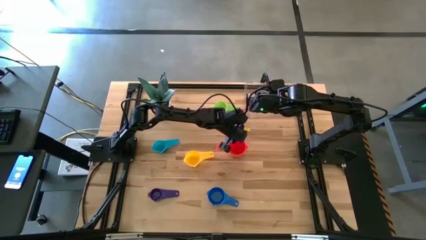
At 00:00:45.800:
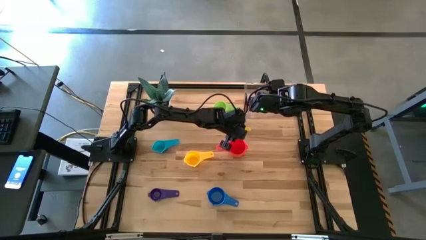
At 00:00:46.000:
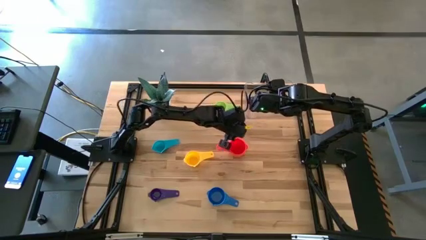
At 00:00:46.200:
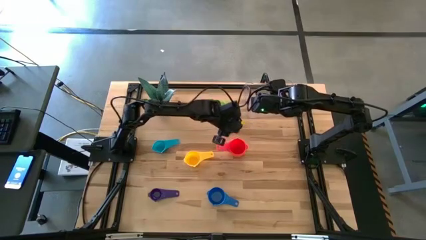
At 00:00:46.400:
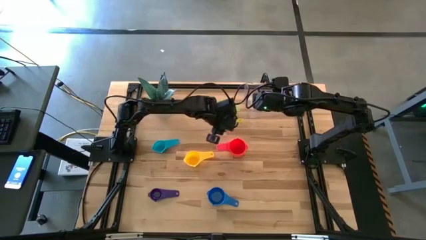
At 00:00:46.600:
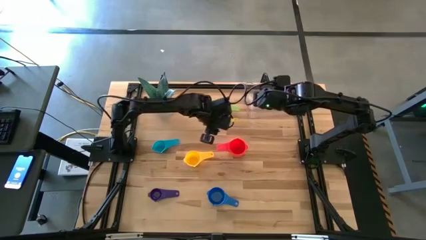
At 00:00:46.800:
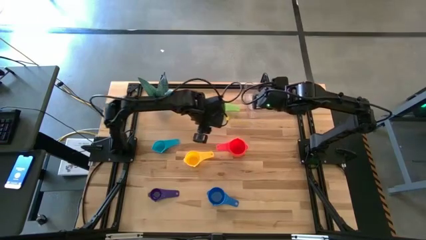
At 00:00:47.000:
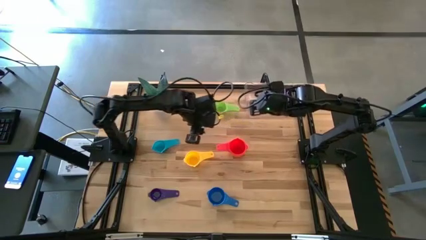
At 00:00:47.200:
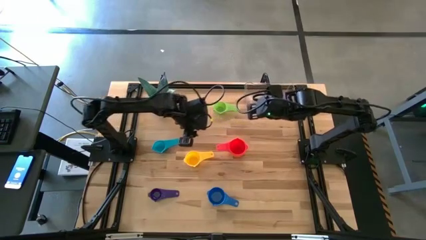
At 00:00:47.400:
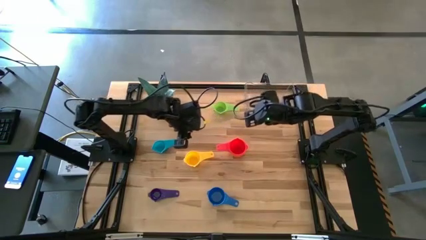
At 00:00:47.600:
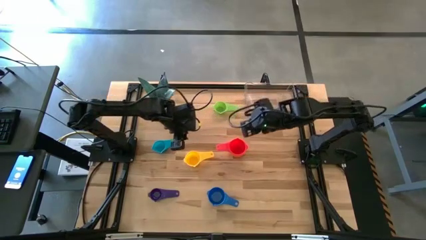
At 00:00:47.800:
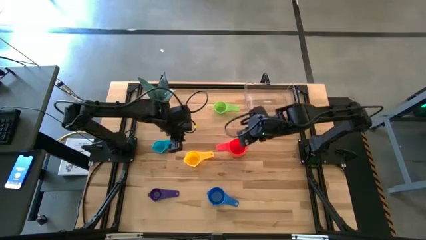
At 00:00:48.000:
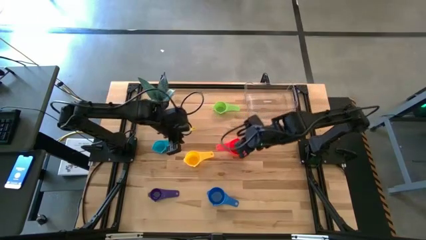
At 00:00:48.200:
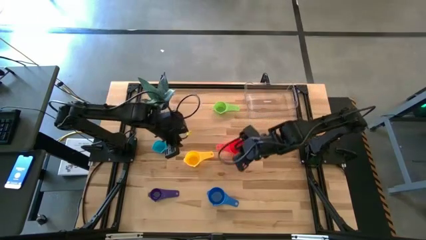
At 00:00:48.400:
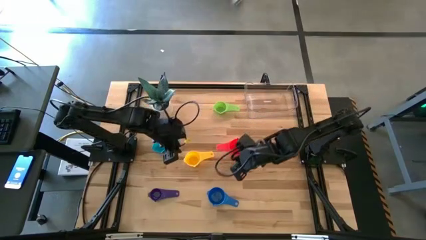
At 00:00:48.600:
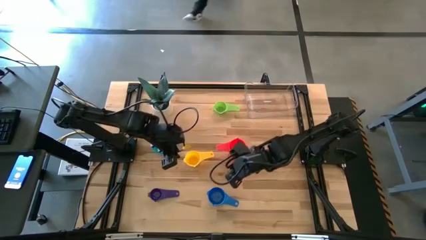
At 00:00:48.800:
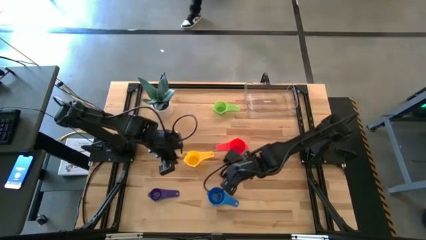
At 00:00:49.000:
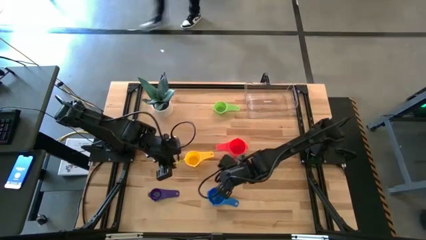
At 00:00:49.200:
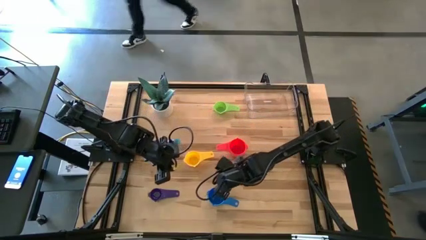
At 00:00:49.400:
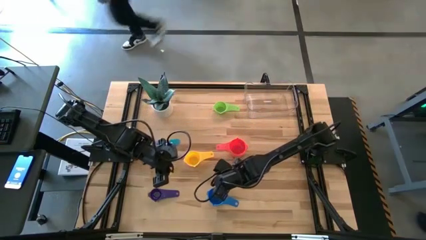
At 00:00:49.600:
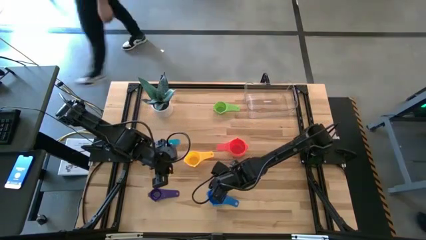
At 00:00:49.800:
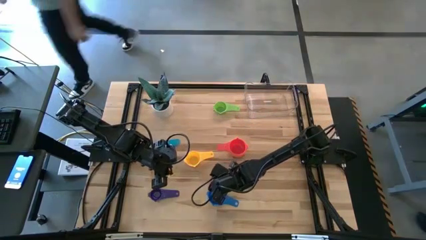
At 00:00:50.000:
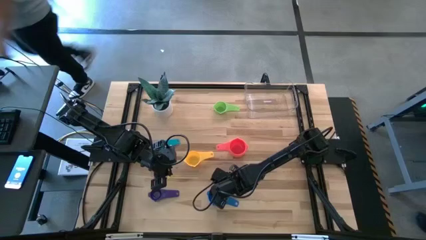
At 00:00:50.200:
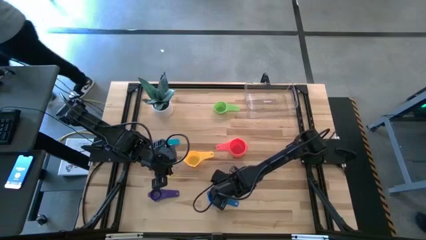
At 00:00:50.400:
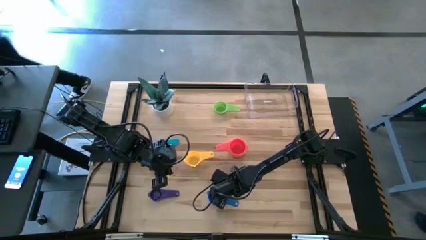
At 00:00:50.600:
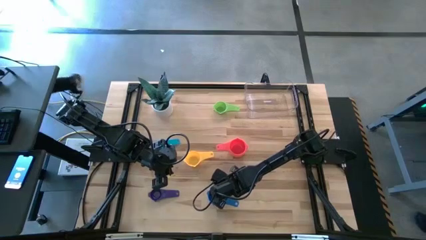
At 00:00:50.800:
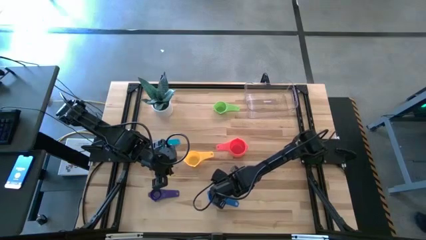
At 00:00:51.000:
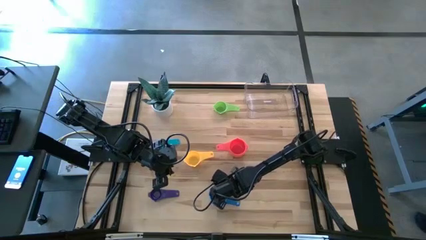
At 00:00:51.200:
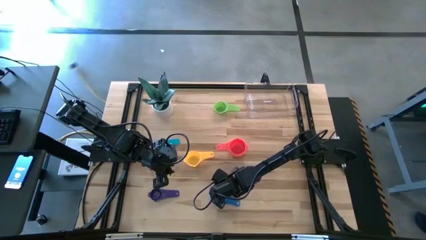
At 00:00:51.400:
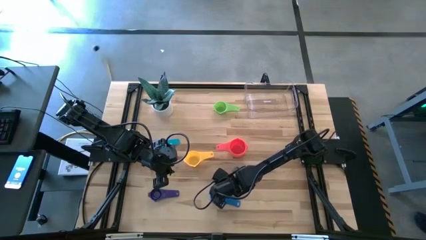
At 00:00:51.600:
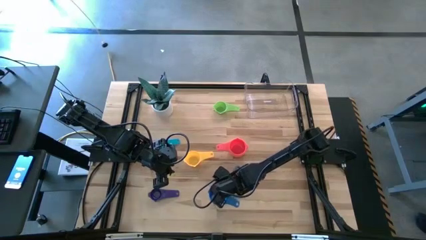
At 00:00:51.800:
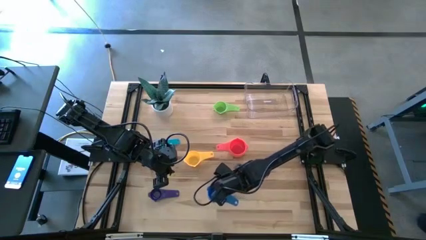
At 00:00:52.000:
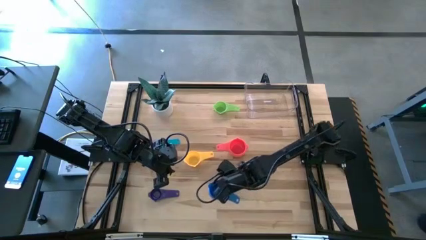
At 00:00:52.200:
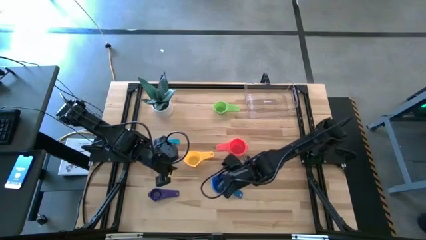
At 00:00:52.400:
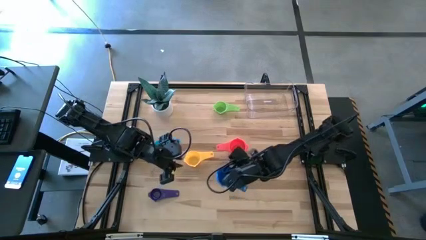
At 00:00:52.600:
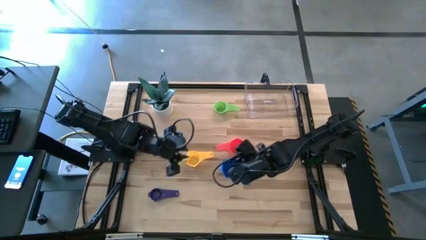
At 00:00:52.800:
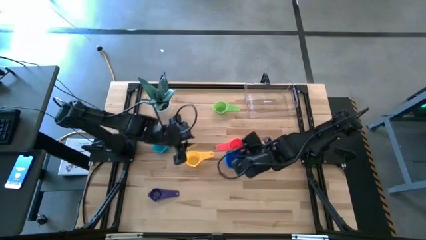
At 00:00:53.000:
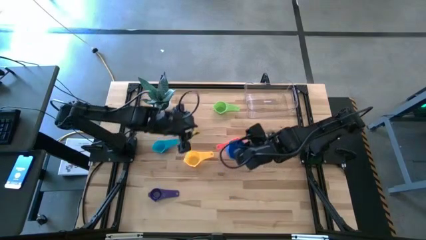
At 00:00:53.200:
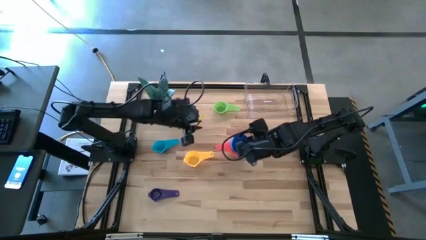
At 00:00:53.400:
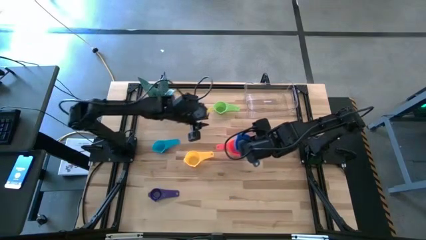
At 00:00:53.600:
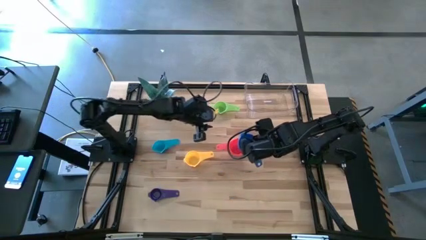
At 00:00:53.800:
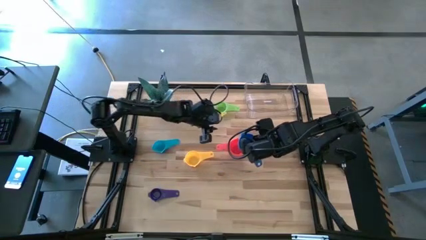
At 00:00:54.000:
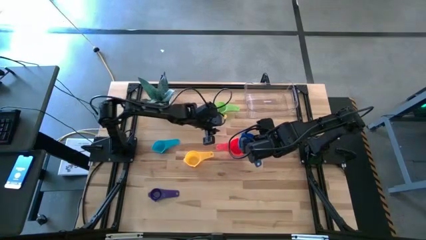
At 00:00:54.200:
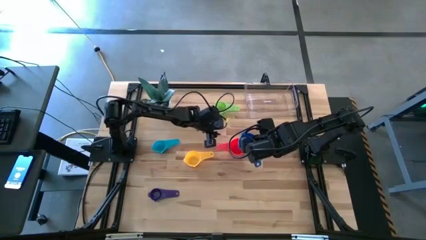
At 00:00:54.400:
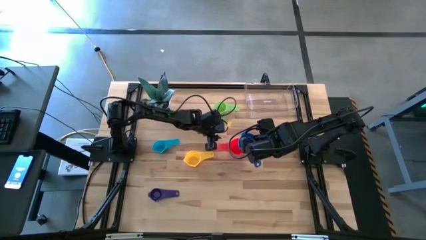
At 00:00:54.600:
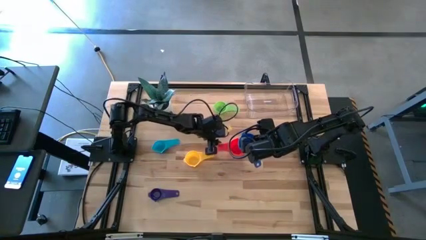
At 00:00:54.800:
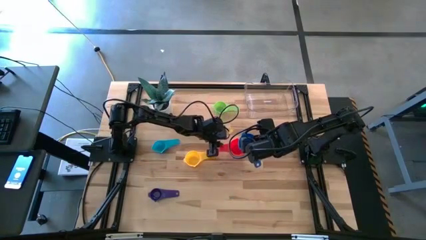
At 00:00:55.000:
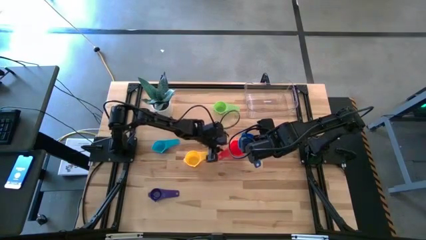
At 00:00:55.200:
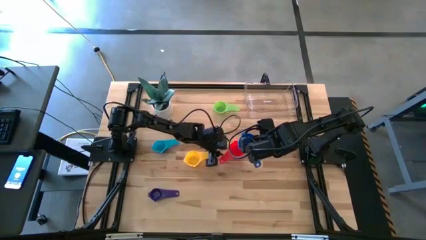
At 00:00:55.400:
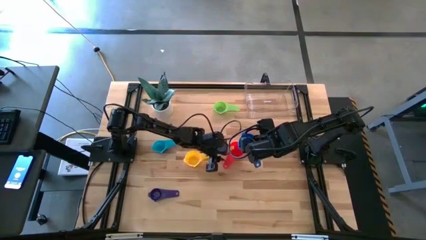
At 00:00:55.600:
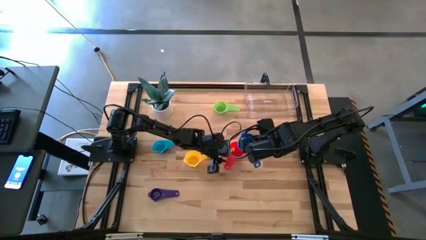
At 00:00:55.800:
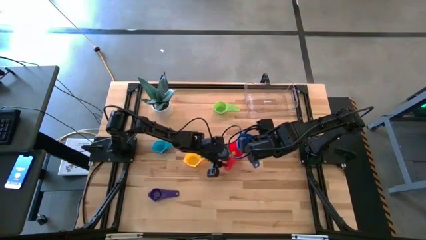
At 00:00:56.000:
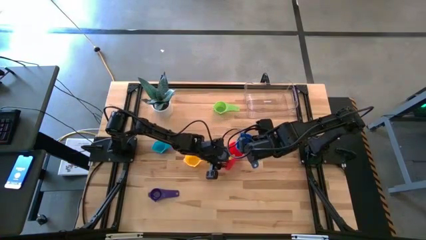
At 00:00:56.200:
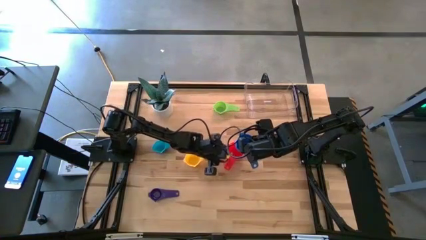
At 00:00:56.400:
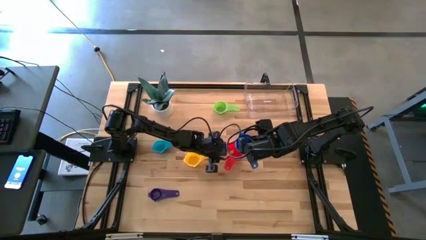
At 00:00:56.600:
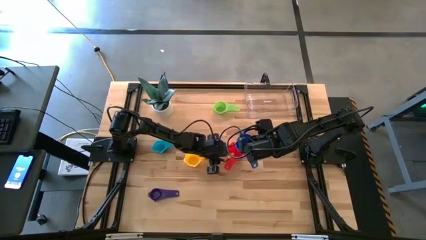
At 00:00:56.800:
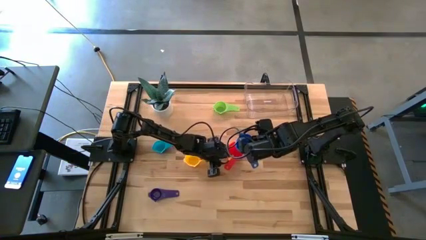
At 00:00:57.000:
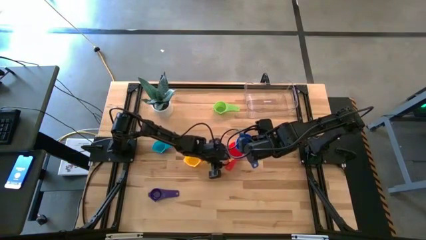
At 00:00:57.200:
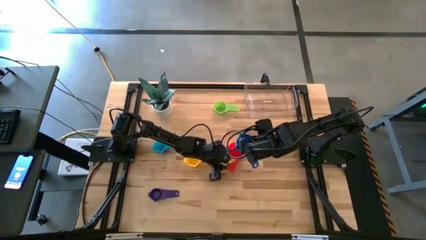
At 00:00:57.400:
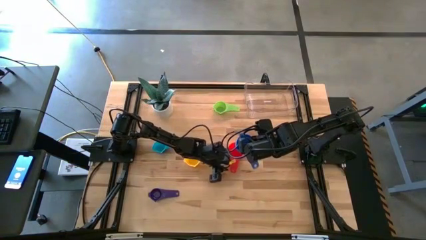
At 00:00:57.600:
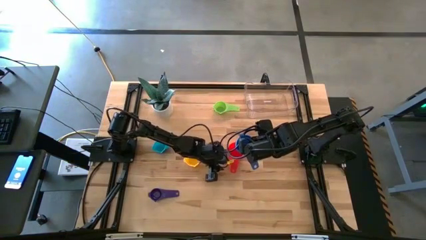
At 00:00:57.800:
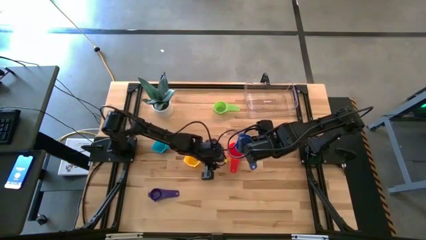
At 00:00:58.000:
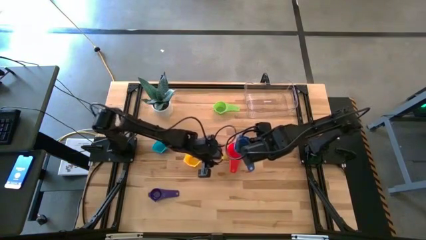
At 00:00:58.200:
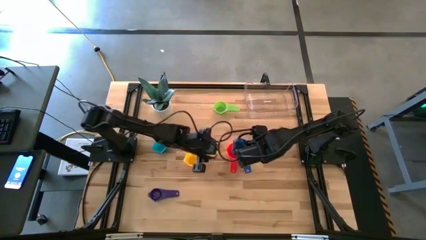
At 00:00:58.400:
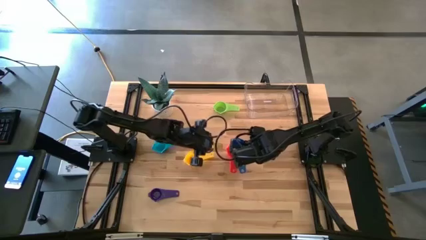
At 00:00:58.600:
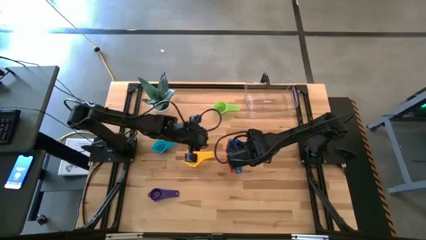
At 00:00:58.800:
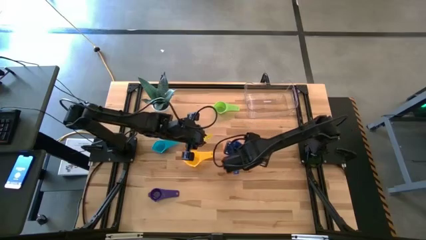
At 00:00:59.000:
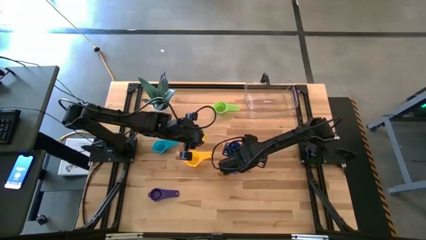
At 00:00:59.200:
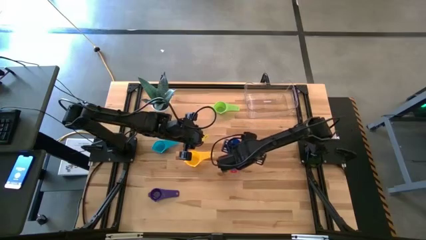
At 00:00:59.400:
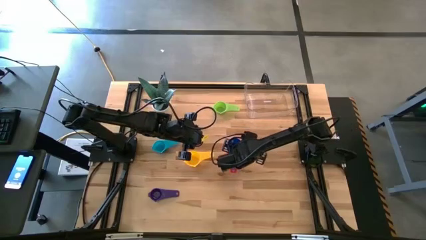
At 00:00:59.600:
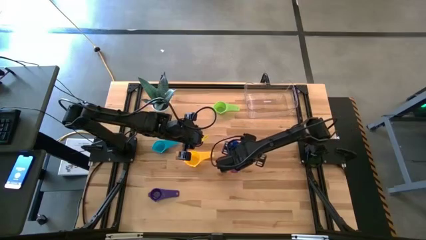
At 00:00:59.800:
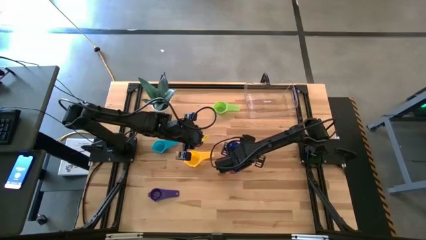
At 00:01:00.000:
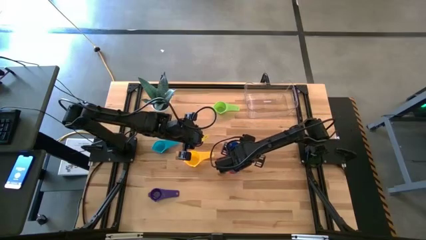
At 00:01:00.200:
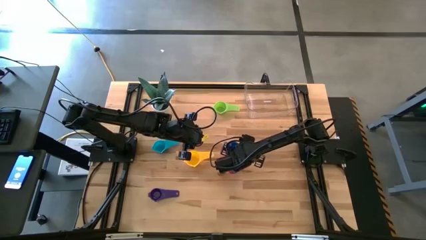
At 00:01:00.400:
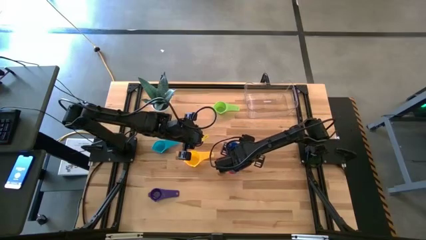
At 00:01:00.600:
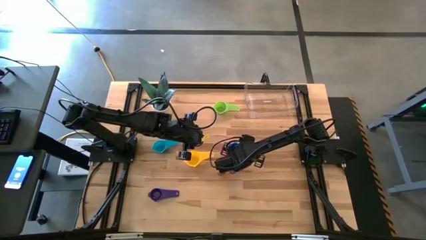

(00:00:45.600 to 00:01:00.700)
Task: Nest measuring cups in basket
Stack the blue measuring cup on top of the red measuring cup

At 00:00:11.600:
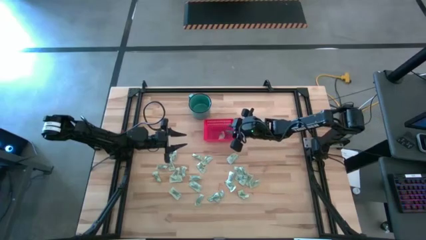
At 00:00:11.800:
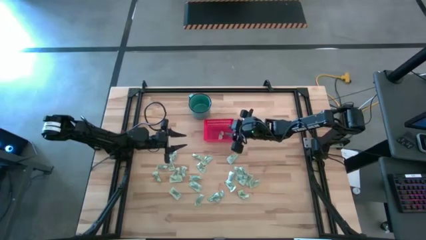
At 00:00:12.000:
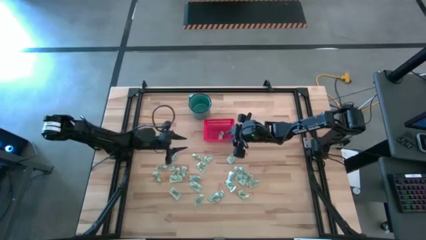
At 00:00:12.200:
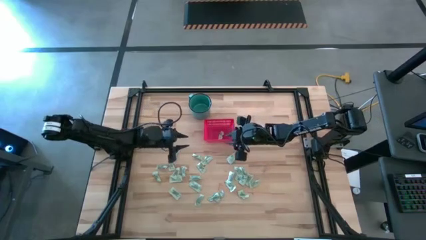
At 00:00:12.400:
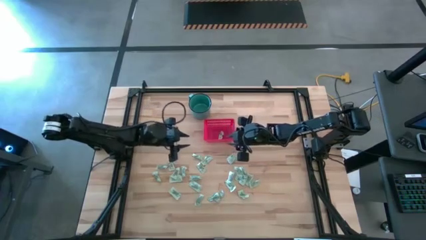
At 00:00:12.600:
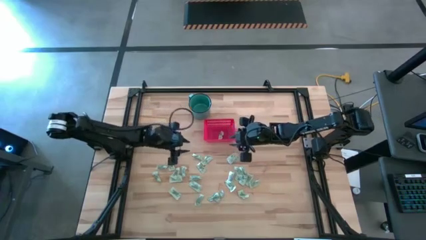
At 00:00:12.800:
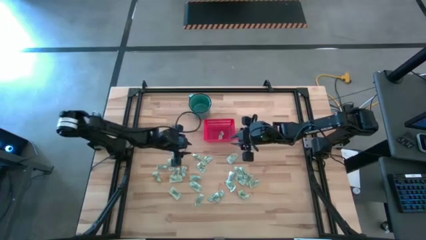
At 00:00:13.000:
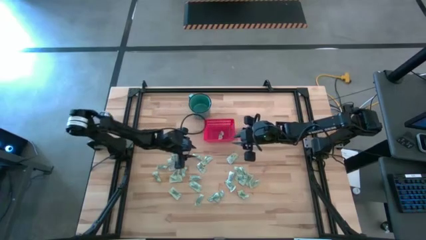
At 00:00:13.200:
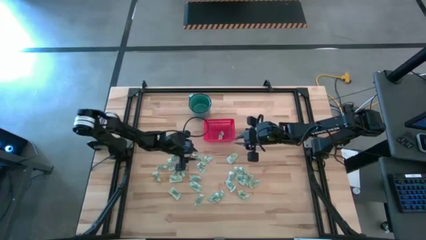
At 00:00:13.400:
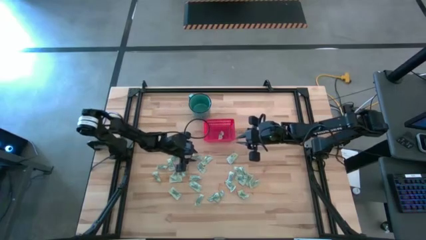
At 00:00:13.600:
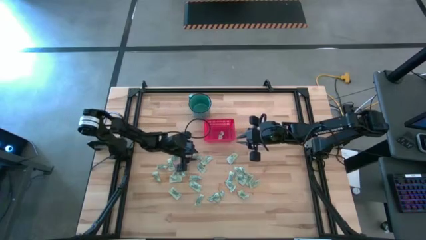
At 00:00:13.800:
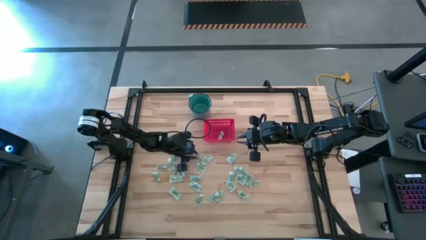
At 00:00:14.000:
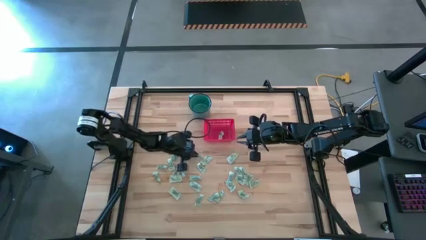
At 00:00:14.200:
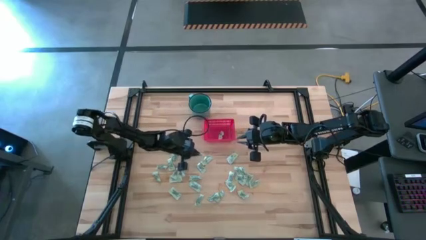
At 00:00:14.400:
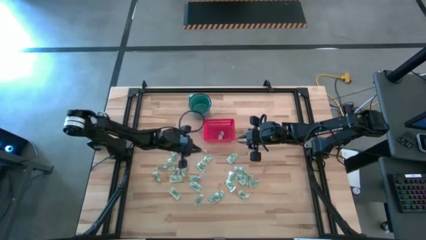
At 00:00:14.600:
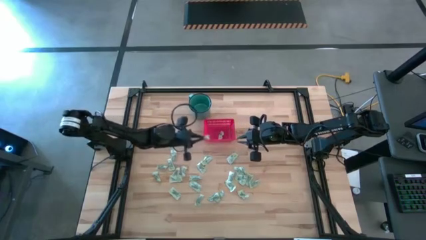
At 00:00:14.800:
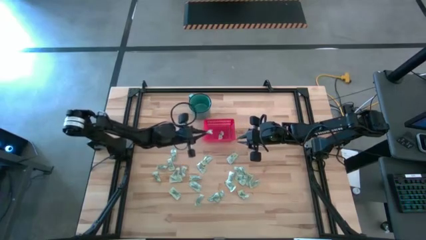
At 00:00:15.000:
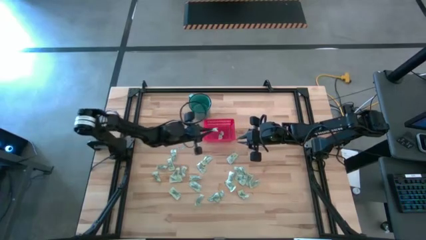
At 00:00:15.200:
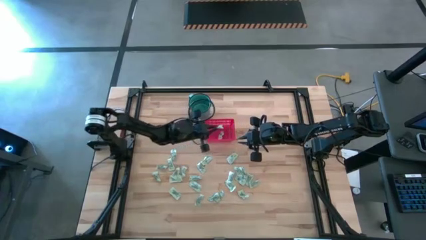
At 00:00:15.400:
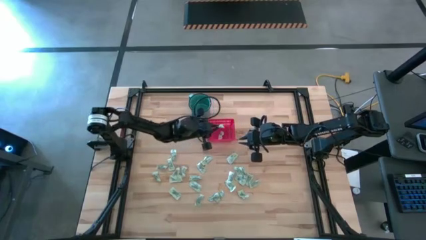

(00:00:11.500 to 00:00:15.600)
Task: Pick and place items into bin
Put the light green stevia packet into the red bin
